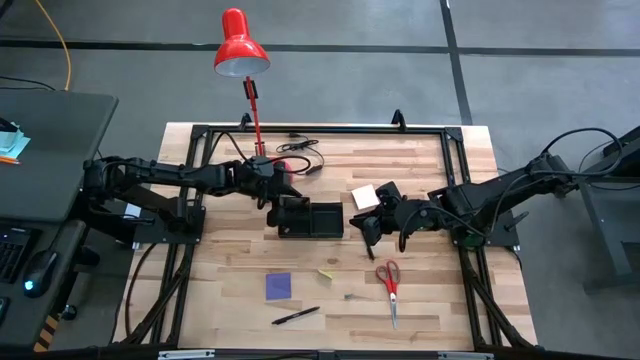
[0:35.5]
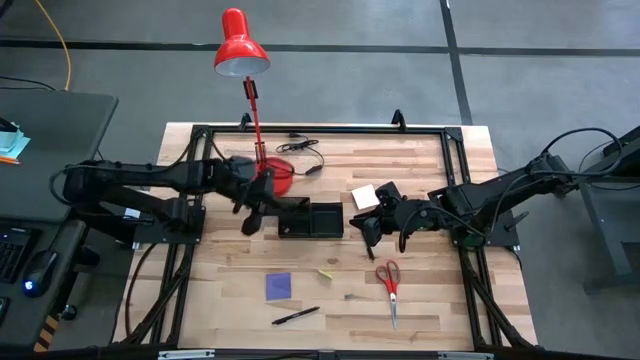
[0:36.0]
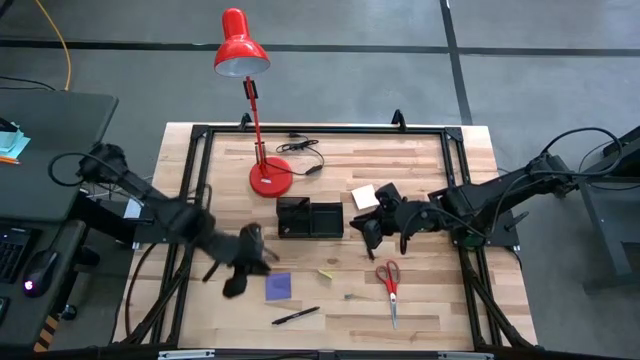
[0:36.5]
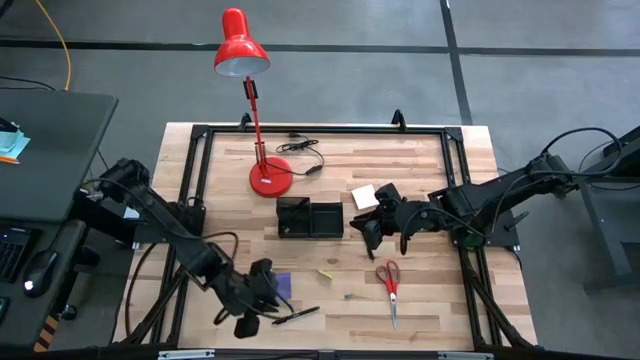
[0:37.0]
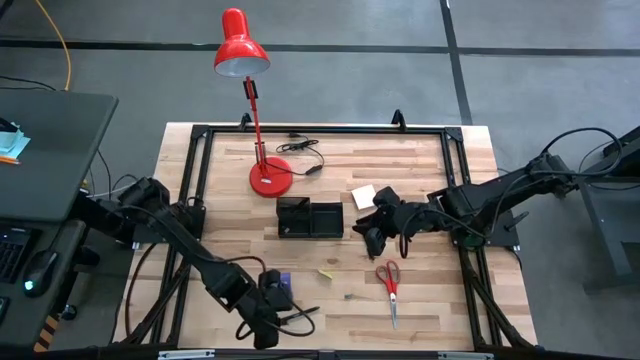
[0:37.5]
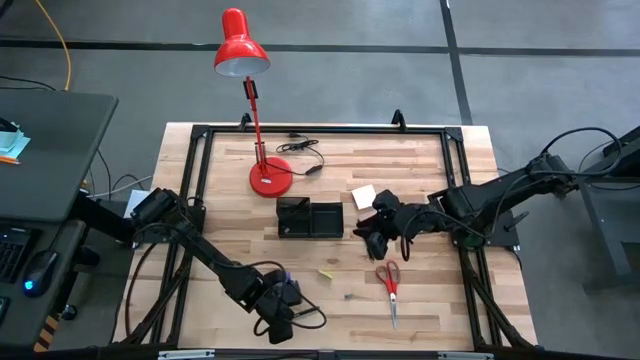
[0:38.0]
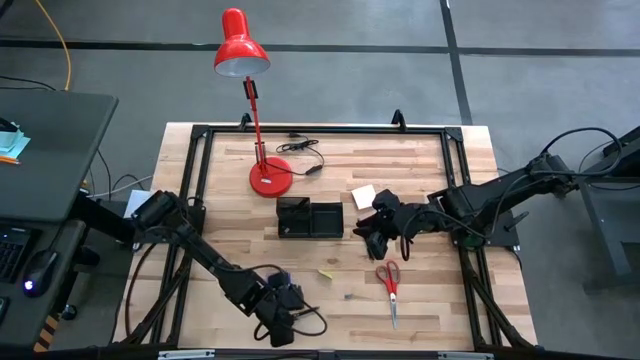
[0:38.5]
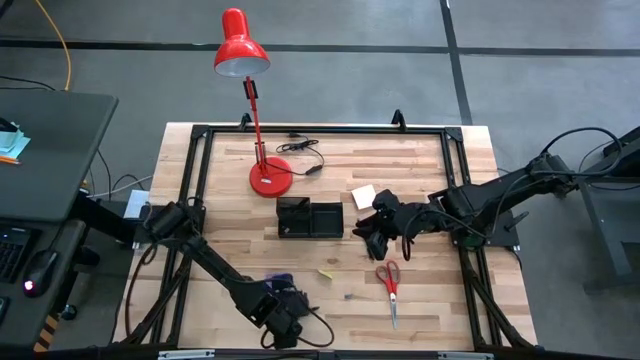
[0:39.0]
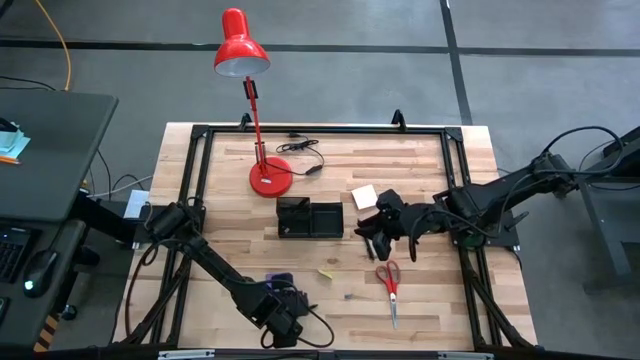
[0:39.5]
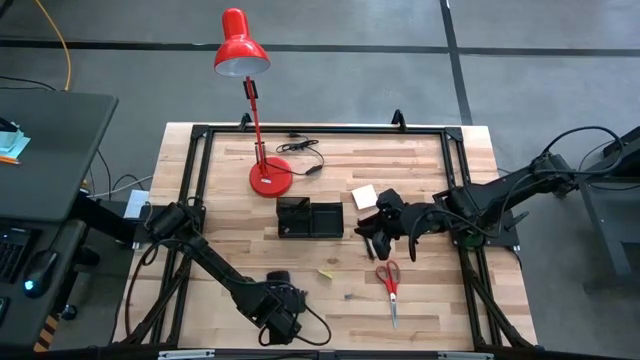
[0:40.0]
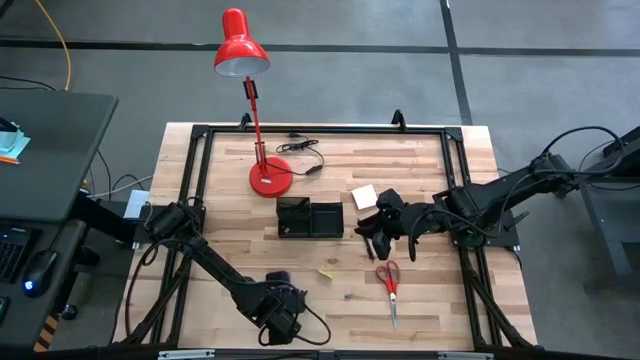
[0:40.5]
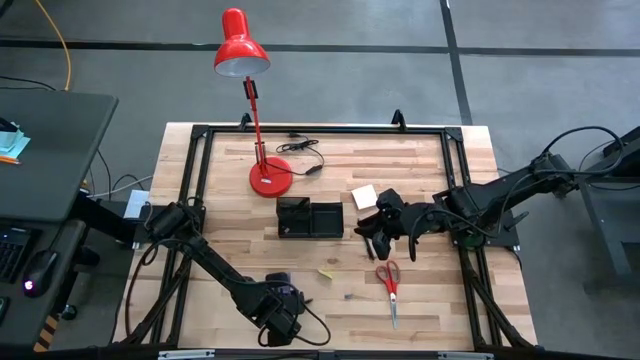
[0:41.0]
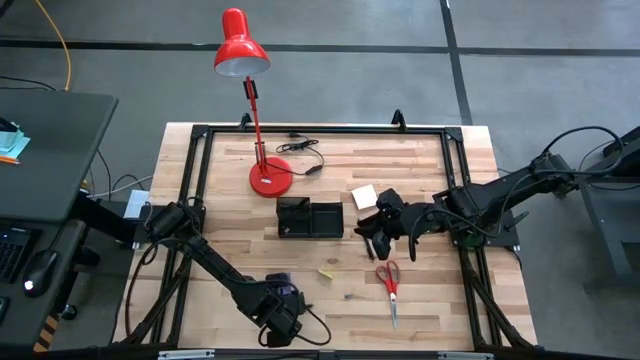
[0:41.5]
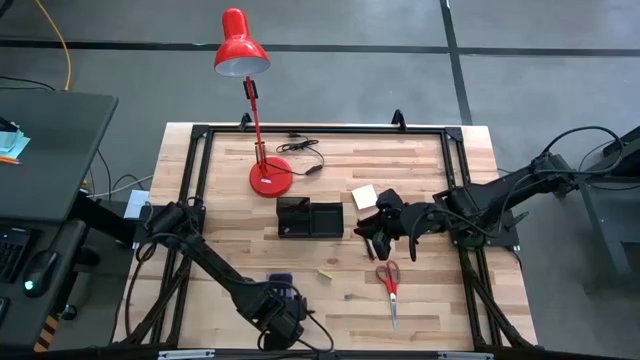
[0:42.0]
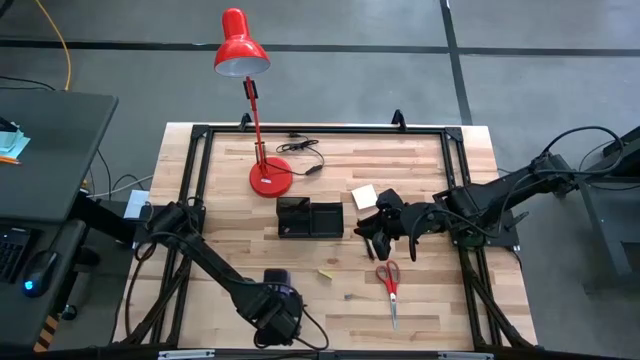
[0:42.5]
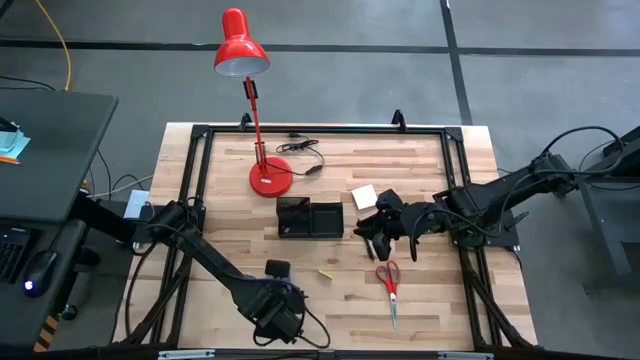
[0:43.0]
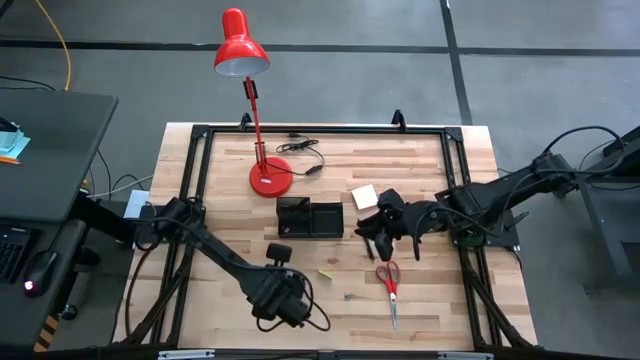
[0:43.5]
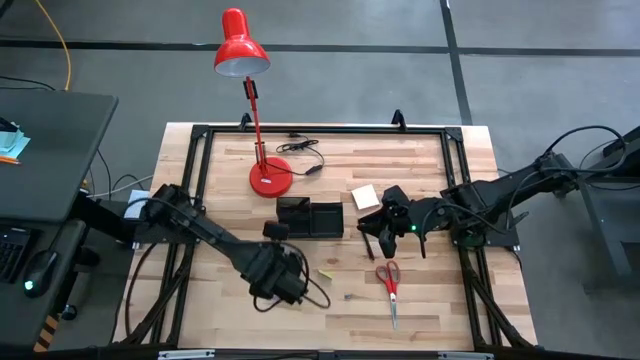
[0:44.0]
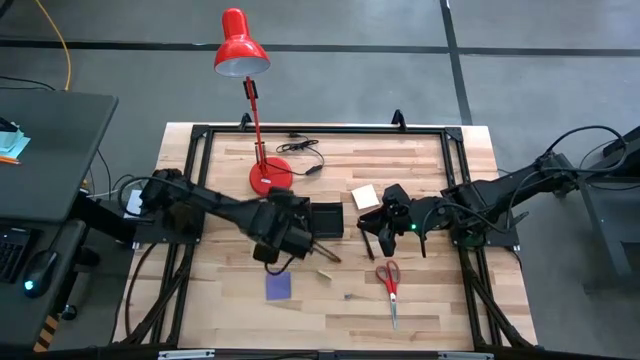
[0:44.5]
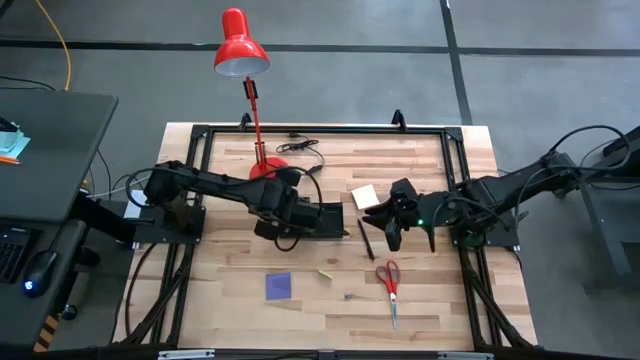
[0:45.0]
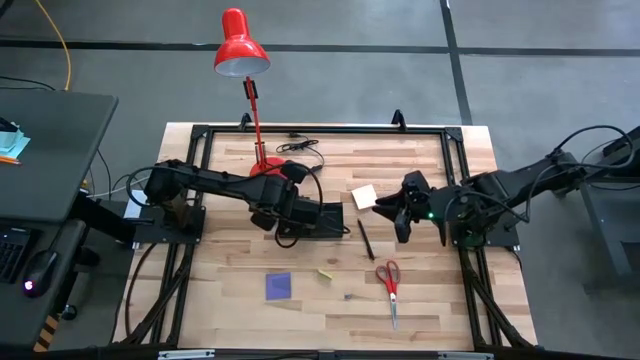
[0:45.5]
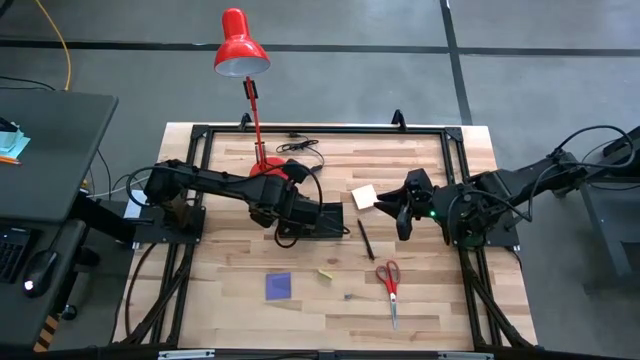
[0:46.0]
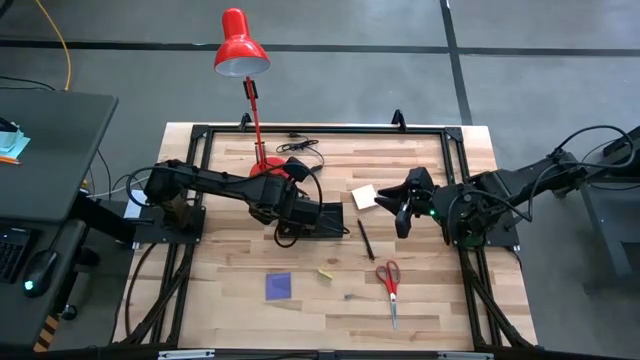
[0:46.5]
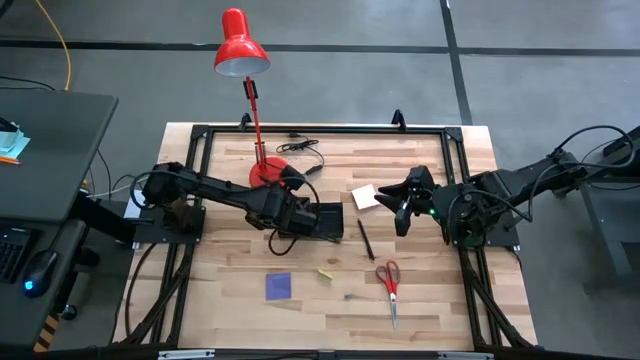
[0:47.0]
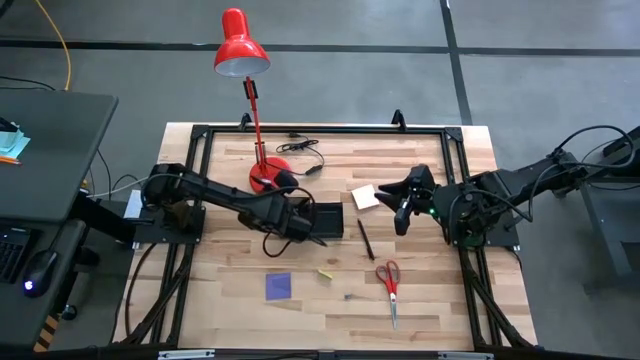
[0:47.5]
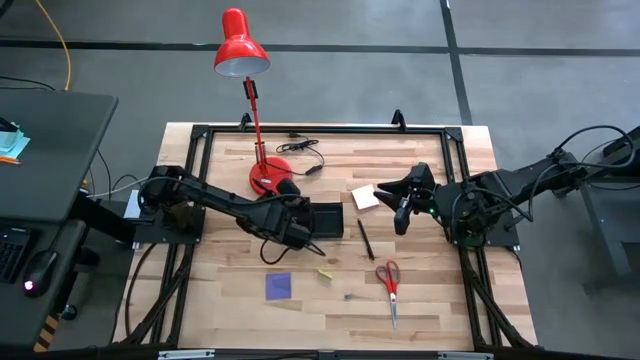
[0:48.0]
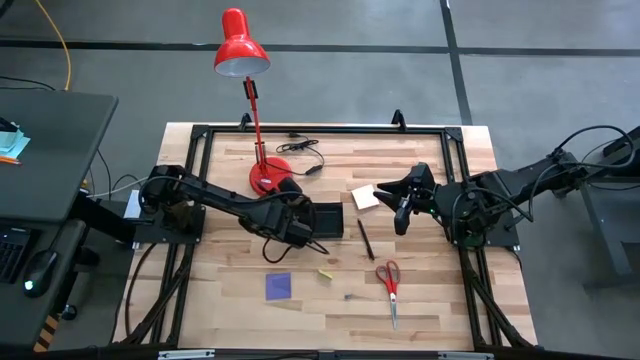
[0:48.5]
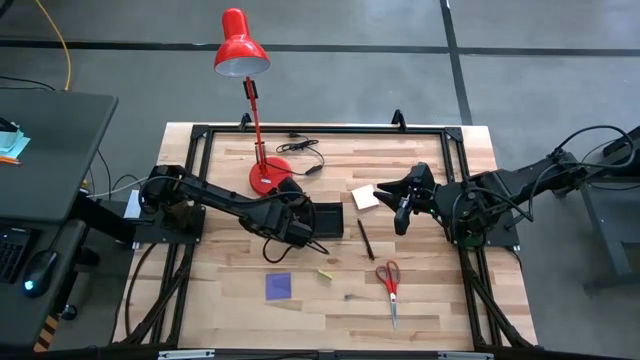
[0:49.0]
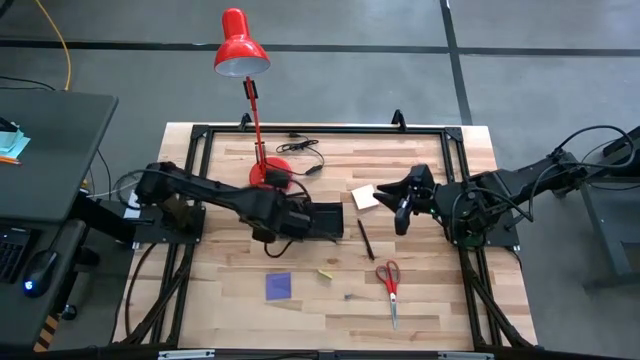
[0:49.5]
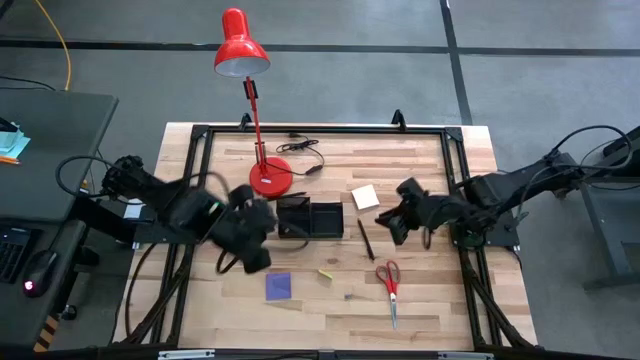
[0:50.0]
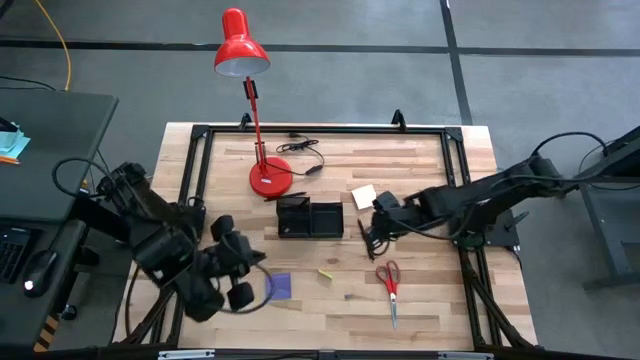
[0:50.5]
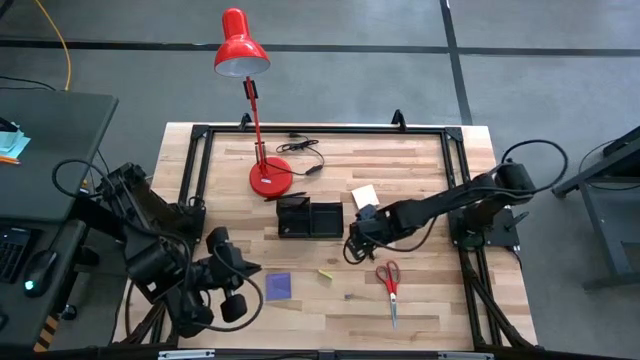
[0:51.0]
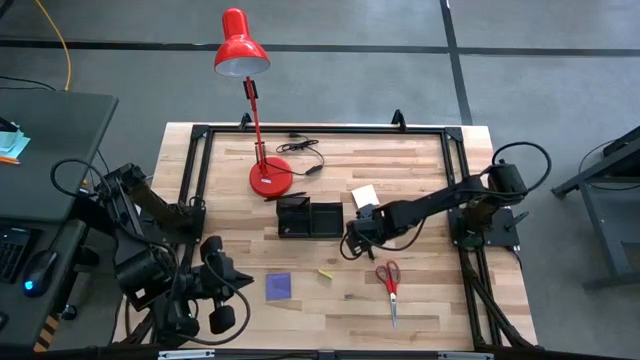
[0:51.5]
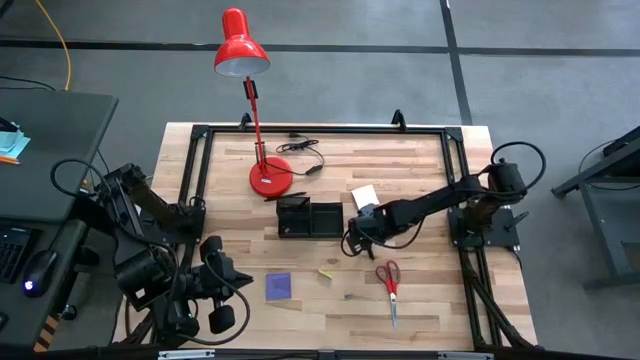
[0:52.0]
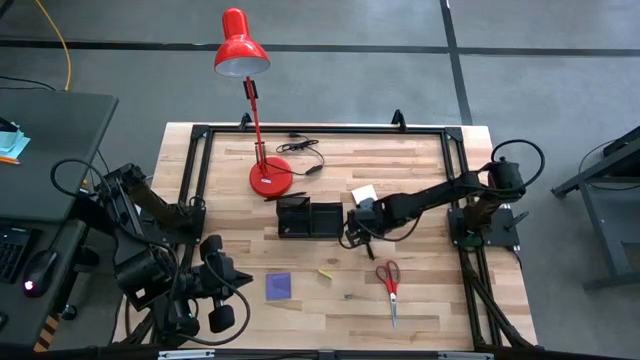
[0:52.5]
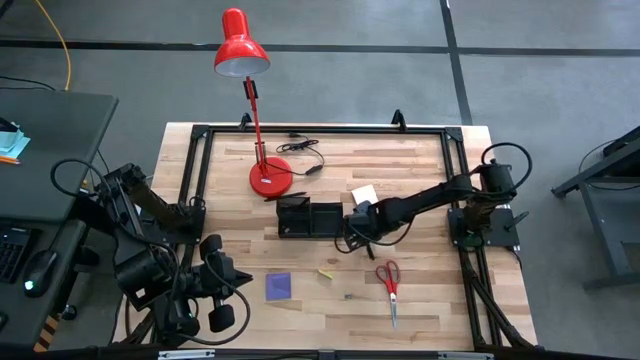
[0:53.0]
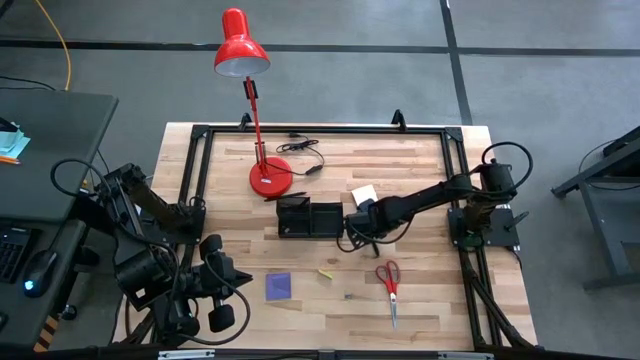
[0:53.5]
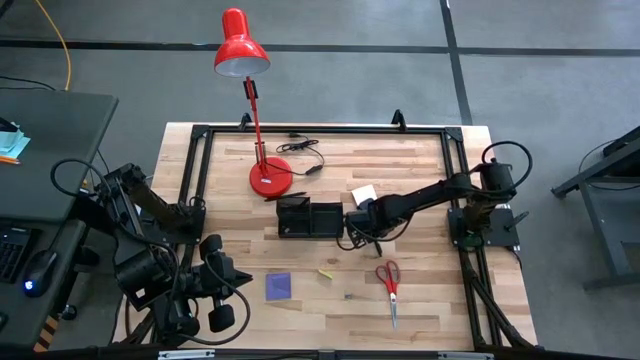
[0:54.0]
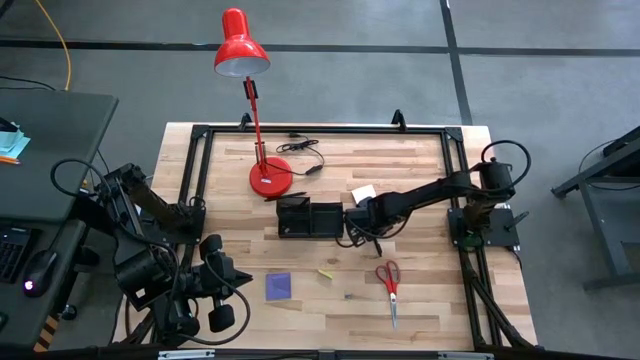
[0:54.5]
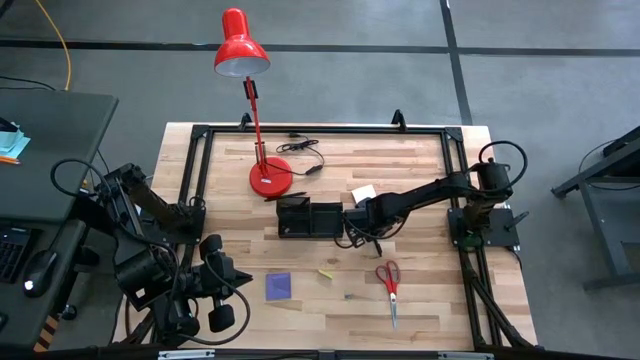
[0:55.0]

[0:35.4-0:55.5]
Task: Pick and place office supplies into organizer
Put the pen into the desk organizer
